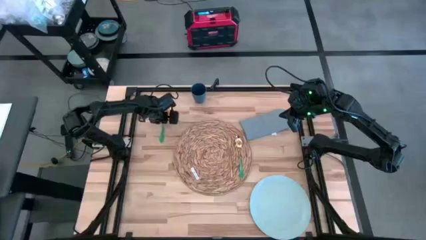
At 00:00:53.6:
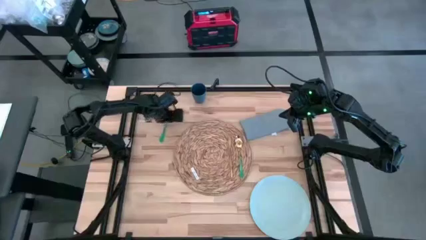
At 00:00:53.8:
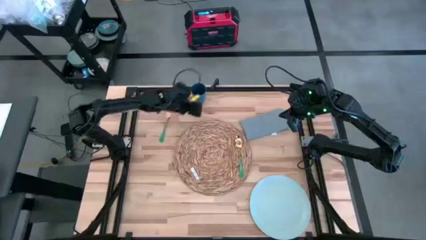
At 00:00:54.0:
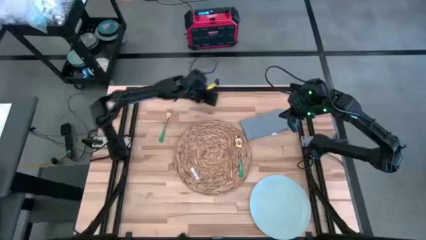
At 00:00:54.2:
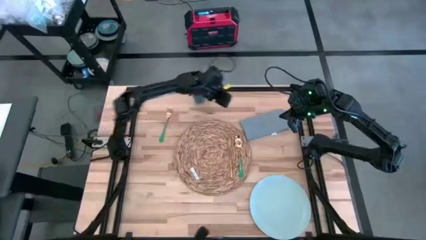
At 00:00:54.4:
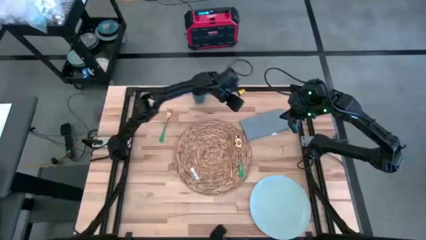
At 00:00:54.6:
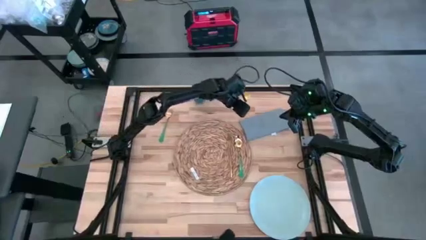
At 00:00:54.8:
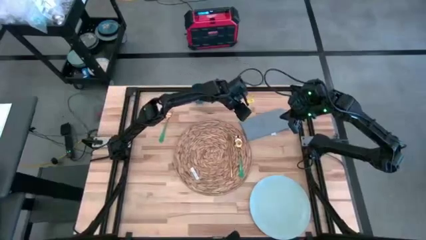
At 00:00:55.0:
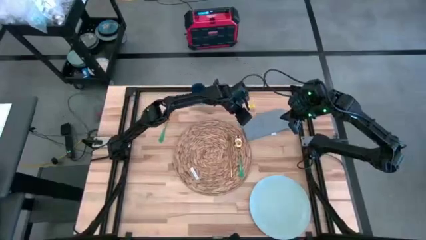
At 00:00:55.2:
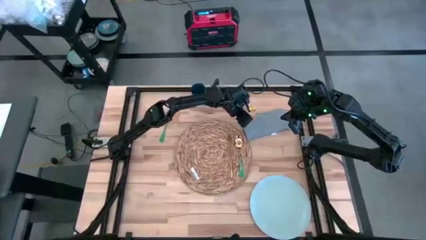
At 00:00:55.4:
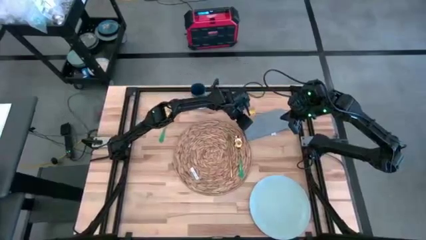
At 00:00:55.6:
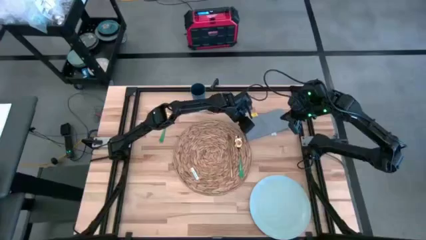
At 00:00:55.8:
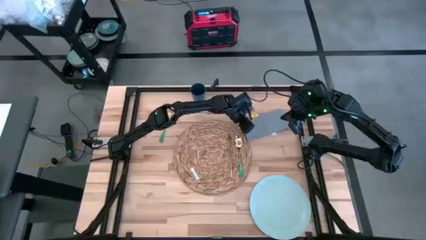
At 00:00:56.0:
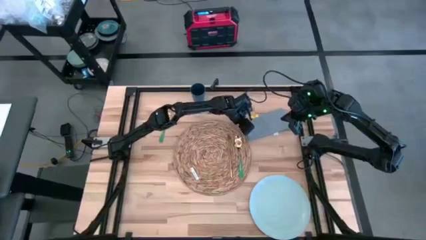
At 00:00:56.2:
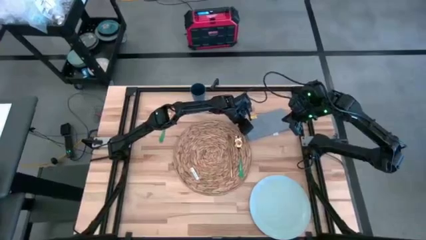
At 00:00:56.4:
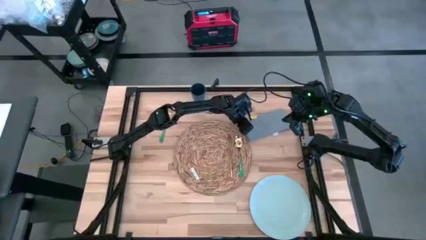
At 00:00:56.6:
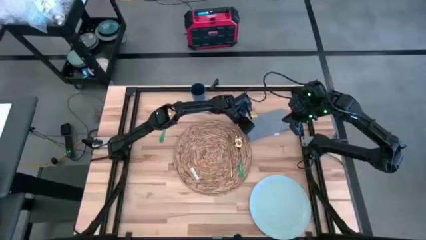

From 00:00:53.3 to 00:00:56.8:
Task: Set table place
Move the gray table napkin to the left of the brown tablemat

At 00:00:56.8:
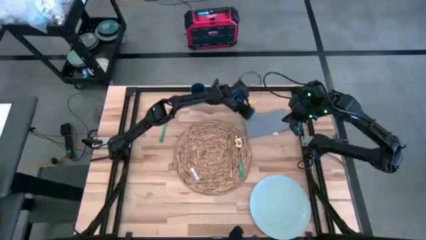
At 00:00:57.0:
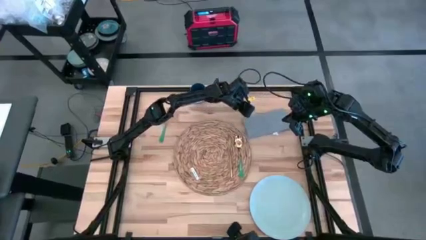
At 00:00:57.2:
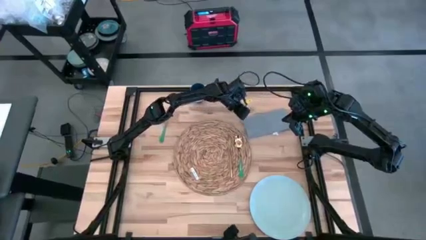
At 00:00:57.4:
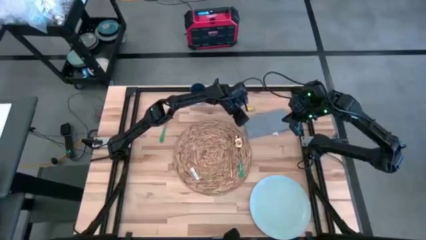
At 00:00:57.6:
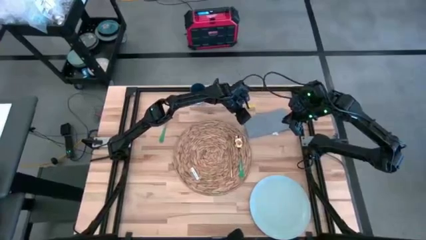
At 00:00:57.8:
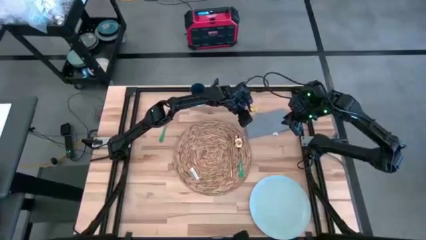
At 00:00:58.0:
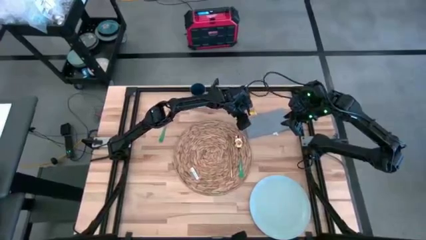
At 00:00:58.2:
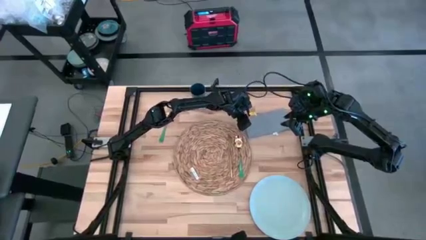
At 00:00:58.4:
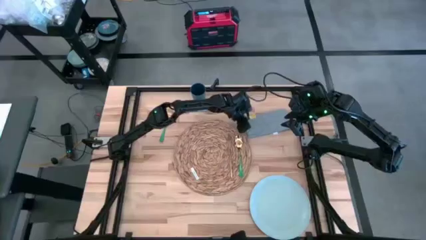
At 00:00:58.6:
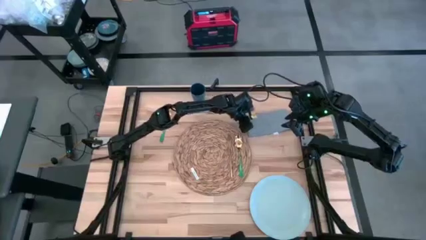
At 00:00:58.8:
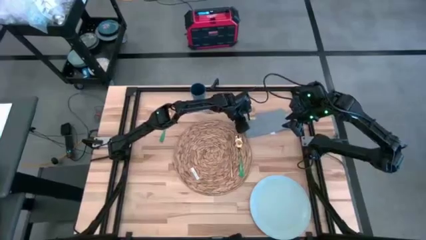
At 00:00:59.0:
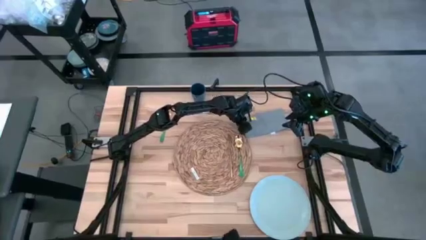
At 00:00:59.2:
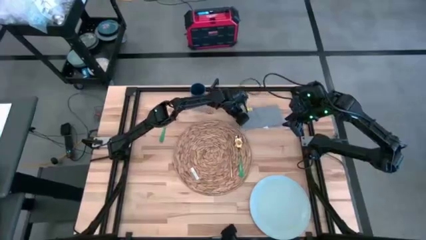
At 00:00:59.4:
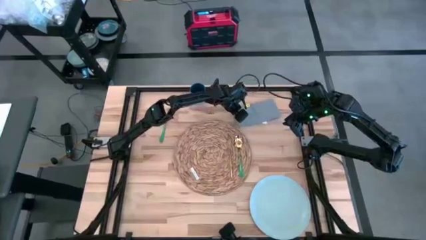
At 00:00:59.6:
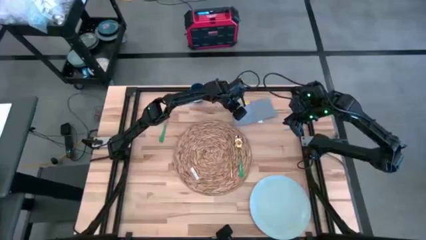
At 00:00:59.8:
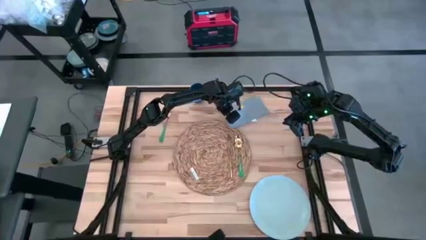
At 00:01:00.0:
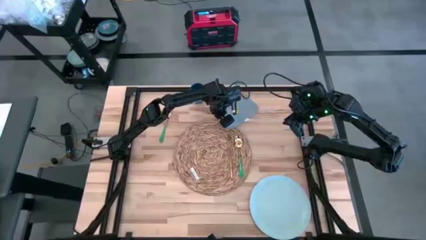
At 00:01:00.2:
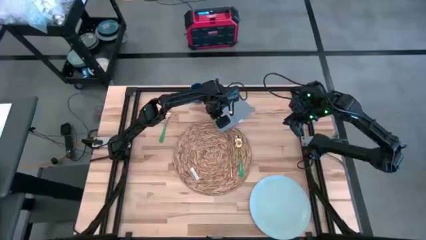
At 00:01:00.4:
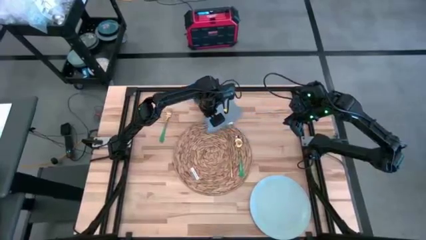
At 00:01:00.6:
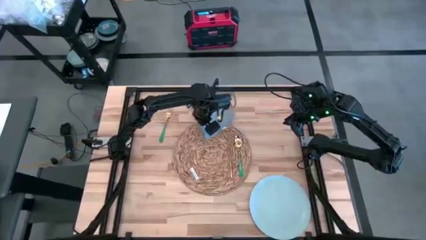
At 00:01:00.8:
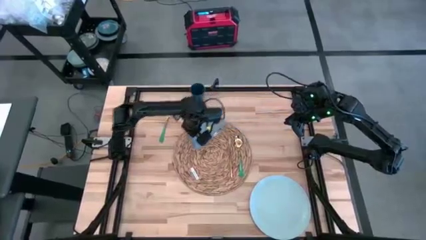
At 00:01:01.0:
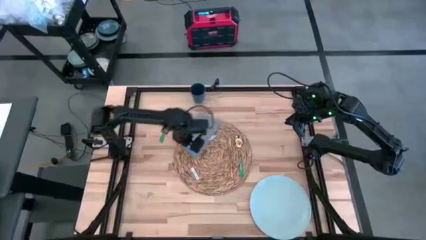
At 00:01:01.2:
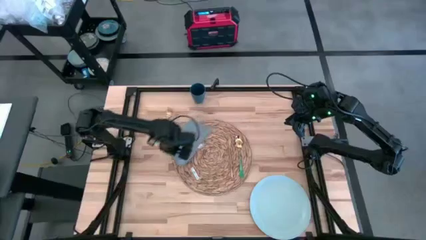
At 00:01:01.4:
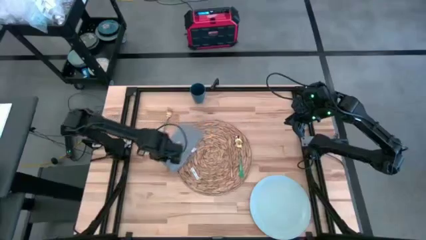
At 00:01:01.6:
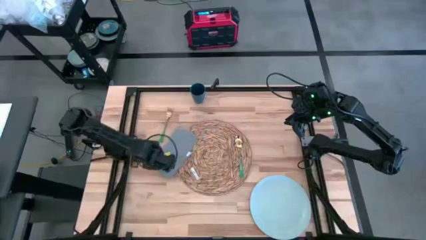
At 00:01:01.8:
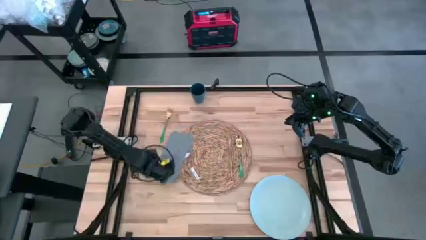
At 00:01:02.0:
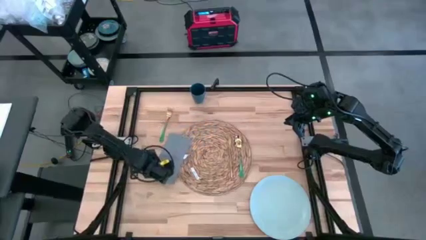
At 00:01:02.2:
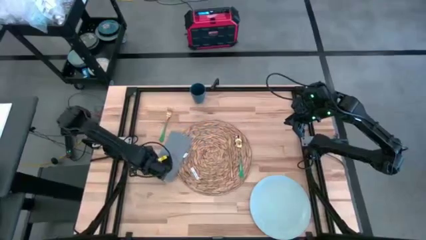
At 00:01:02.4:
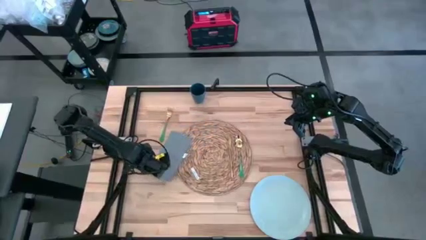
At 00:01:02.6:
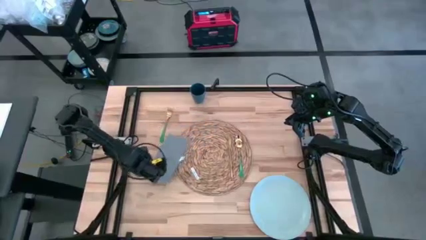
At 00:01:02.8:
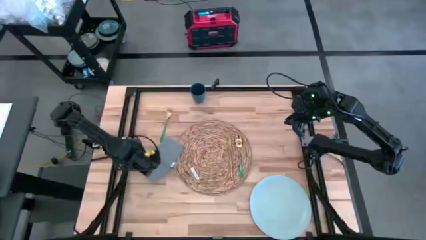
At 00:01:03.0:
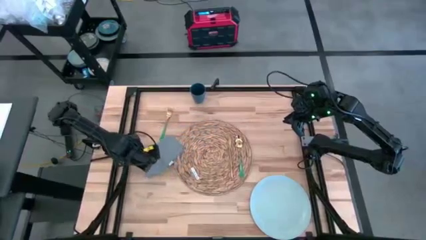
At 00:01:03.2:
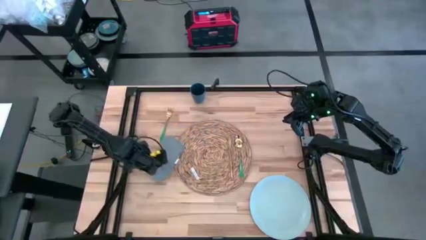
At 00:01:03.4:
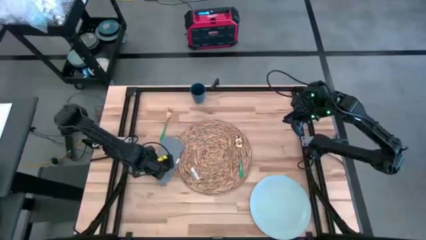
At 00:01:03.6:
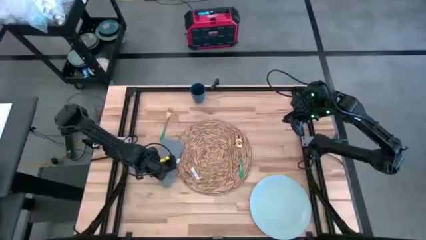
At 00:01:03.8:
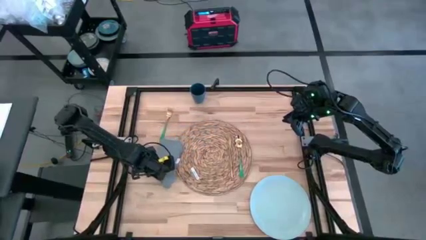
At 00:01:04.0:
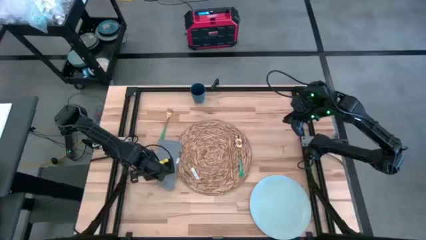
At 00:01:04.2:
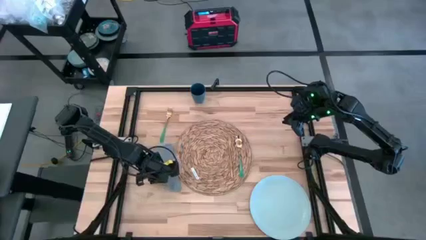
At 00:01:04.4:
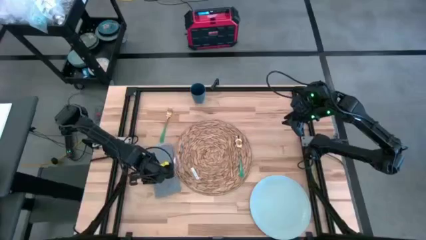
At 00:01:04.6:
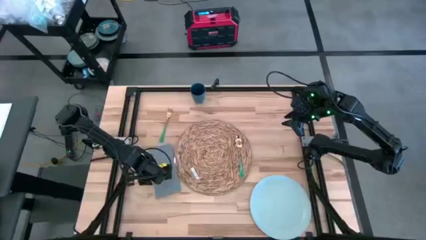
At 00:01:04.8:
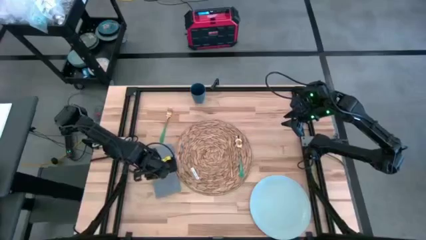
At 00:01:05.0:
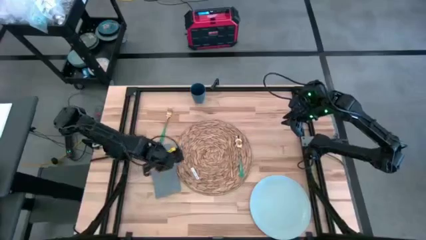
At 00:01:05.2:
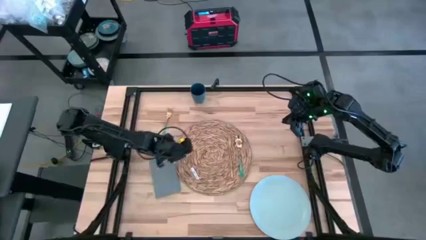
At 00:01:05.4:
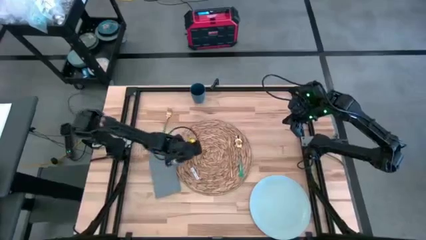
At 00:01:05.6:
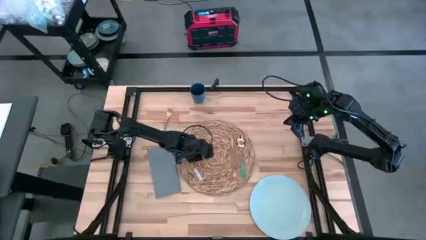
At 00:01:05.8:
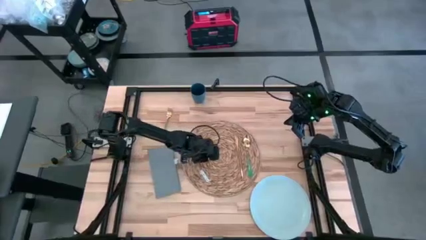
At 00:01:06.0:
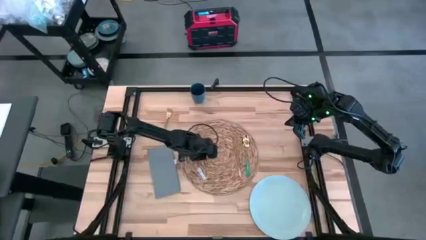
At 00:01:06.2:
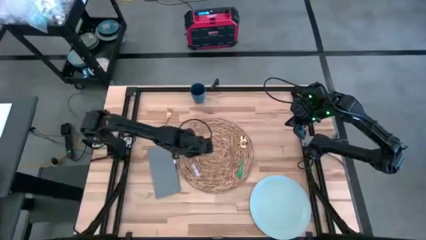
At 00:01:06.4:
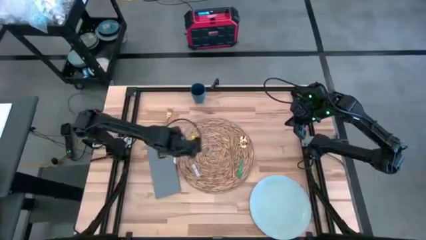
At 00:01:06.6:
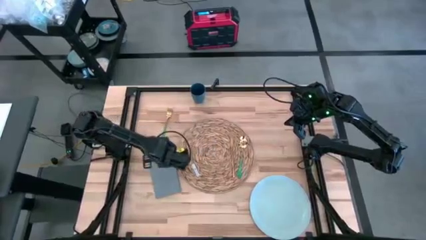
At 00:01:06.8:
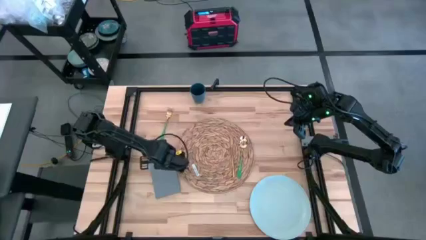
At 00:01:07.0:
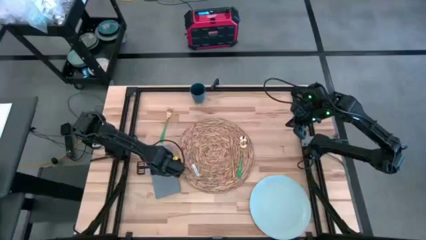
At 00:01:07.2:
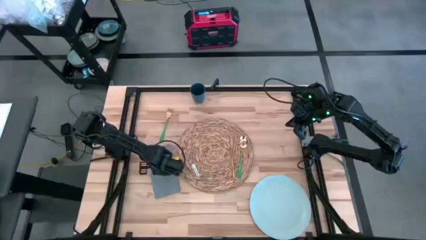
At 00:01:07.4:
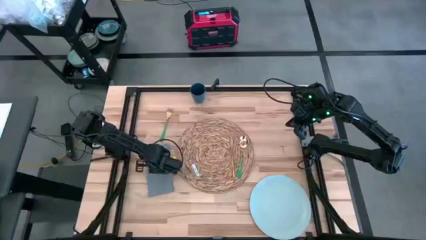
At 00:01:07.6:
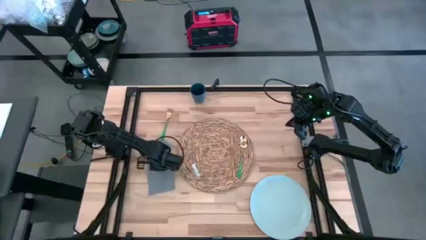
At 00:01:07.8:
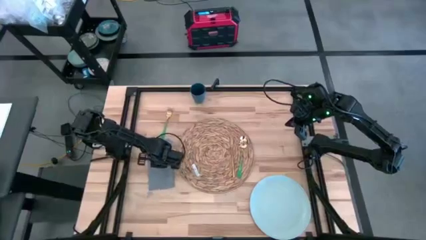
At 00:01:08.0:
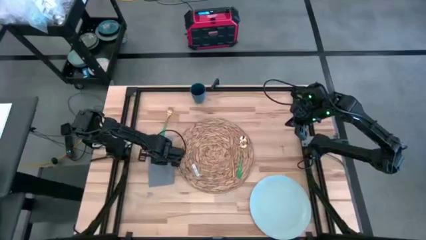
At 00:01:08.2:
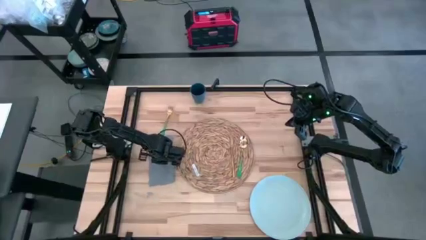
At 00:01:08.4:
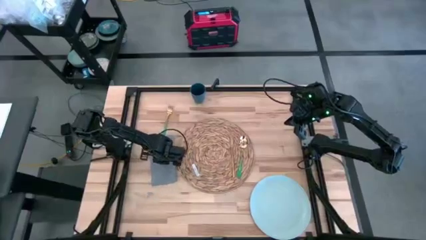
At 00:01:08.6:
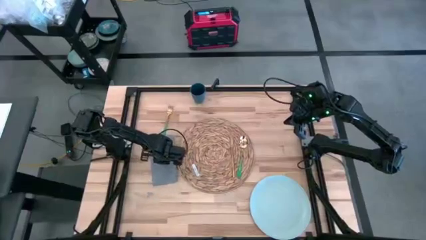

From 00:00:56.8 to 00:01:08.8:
Move the gray table napkin to the left of the brown tablemat
